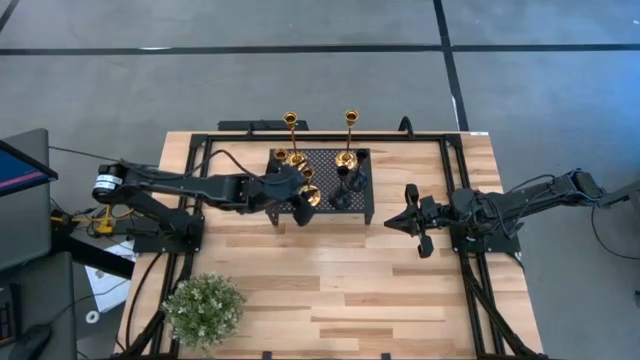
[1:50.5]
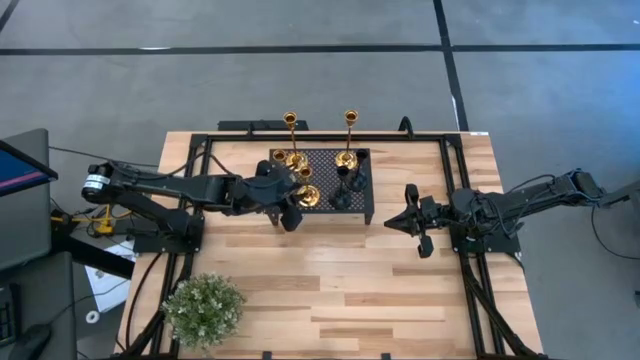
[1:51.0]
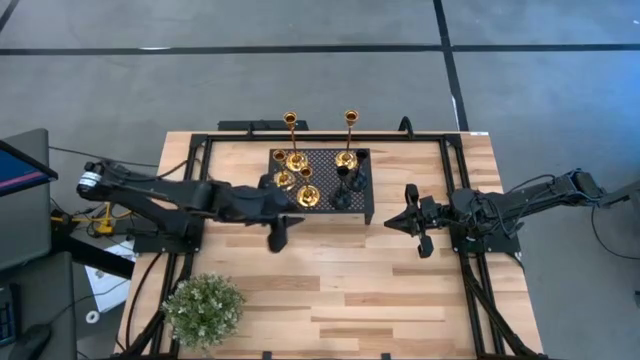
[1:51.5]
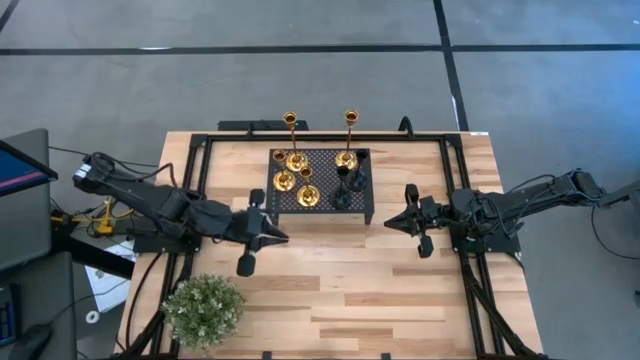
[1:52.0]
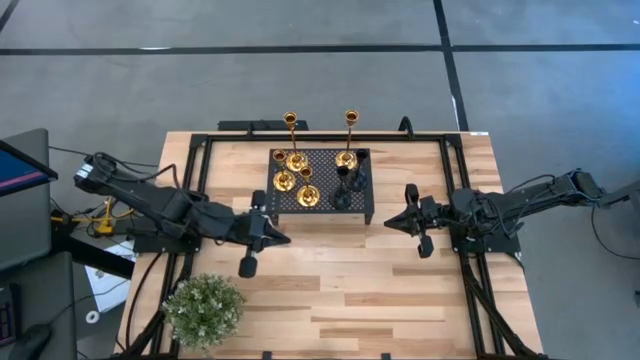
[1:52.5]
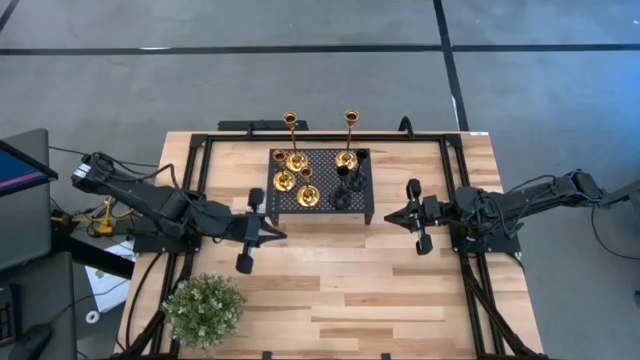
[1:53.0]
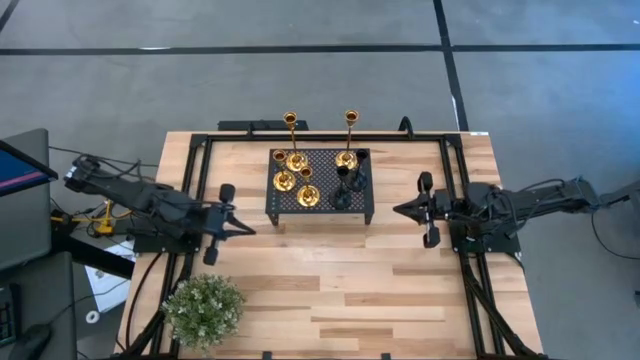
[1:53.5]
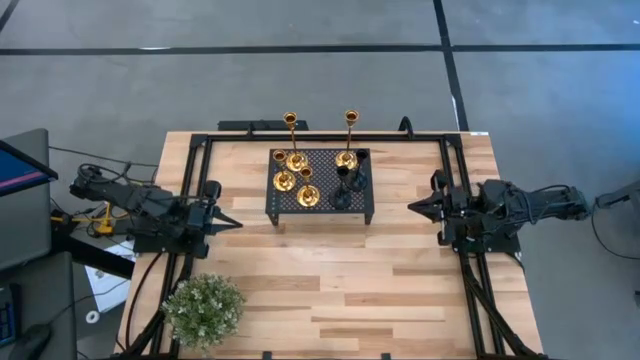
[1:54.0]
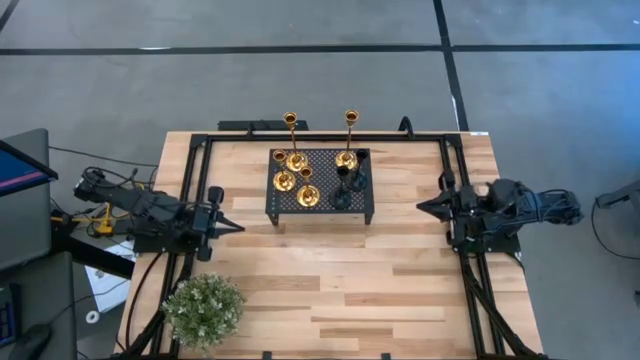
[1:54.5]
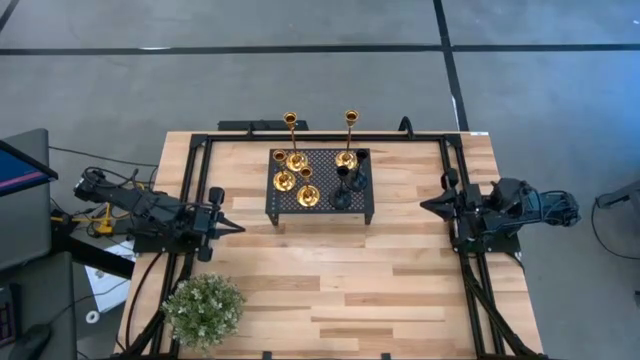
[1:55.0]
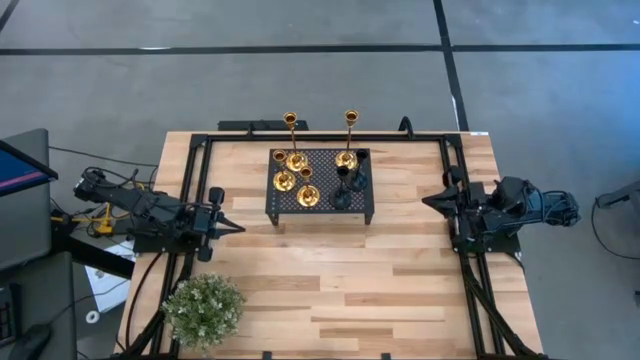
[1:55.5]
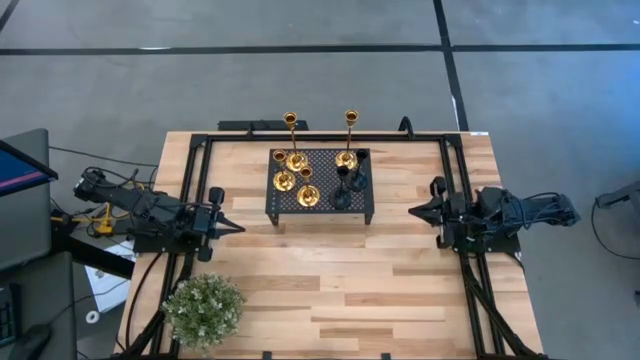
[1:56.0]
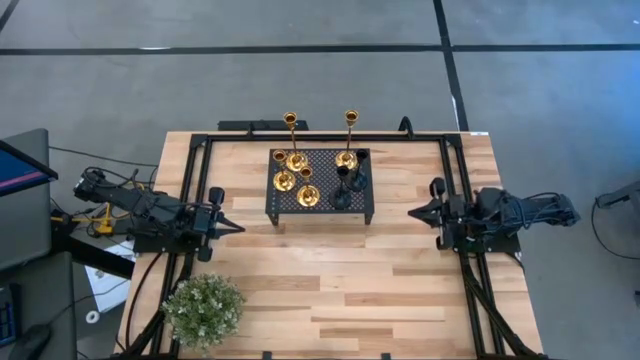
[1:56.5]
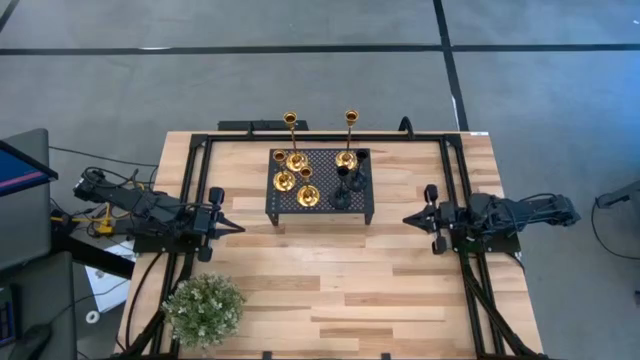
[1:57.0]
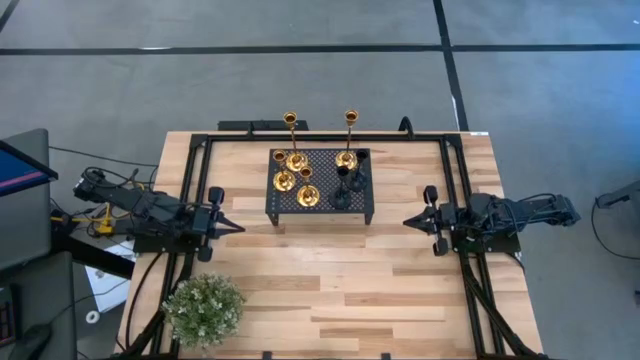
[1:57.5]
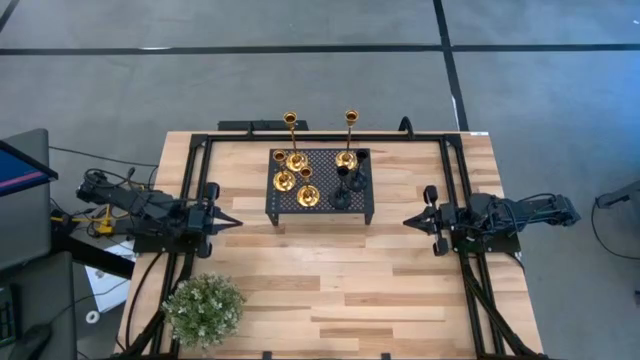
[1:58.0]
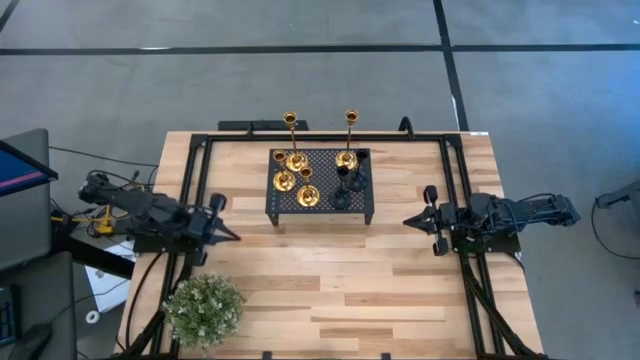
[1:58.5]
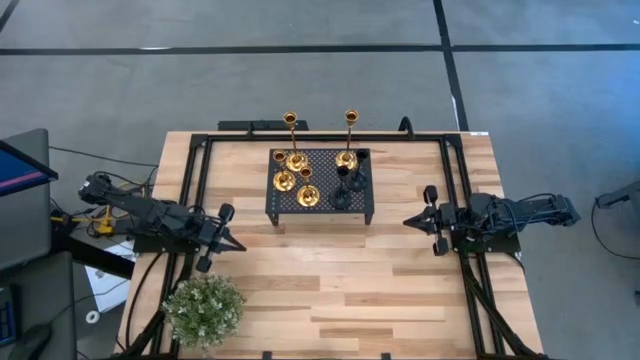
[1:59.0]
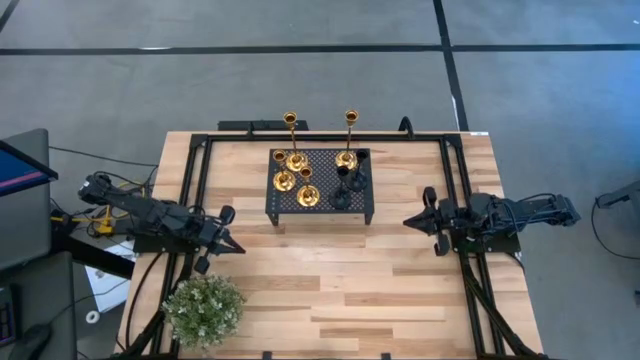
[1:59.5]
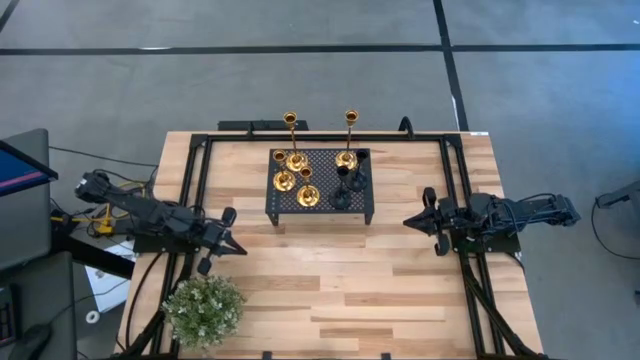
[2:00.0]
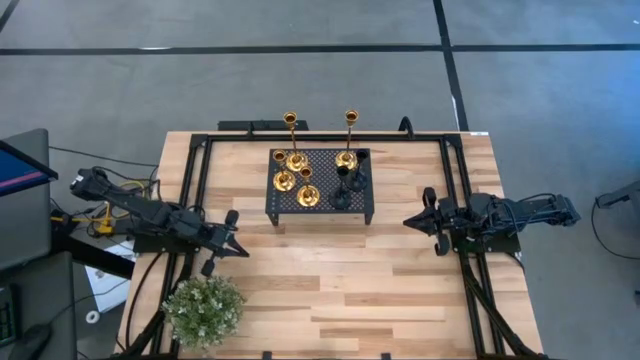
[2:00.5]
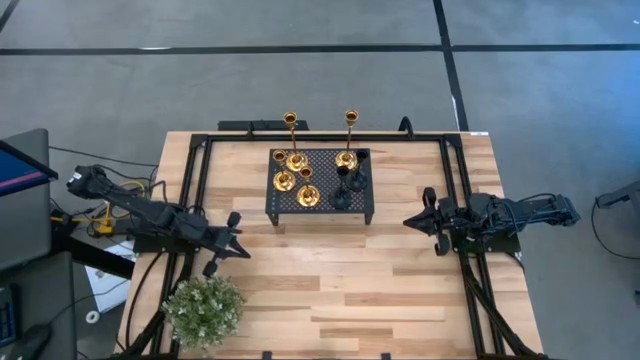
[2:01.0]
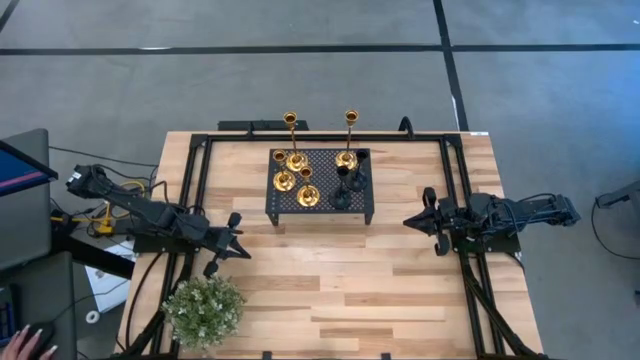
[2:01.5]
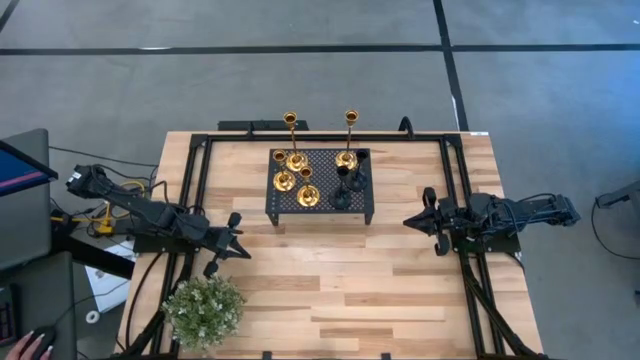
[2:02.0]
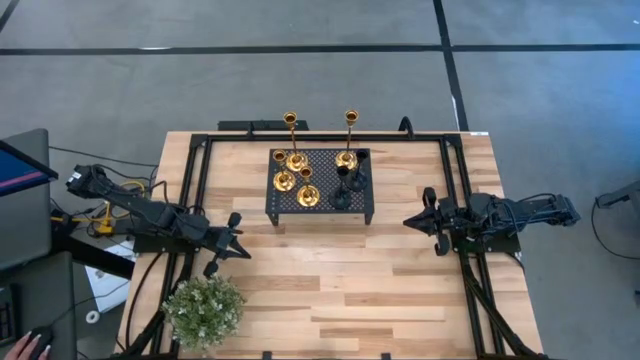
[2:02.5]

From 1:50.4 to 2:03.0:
Task: Pick & Place candle stick holders
Return to Home Position

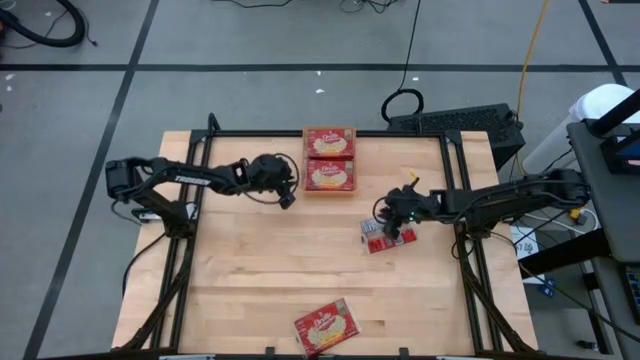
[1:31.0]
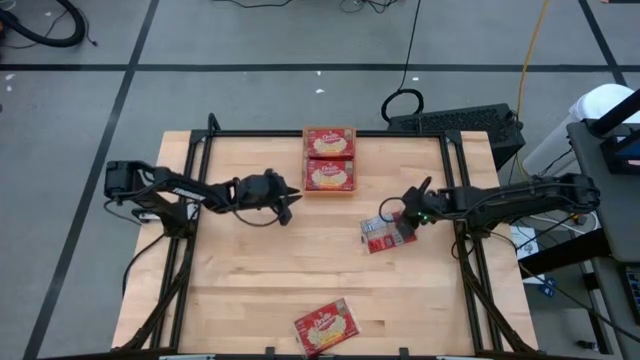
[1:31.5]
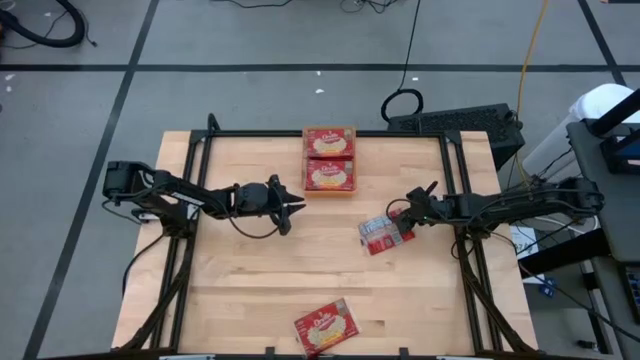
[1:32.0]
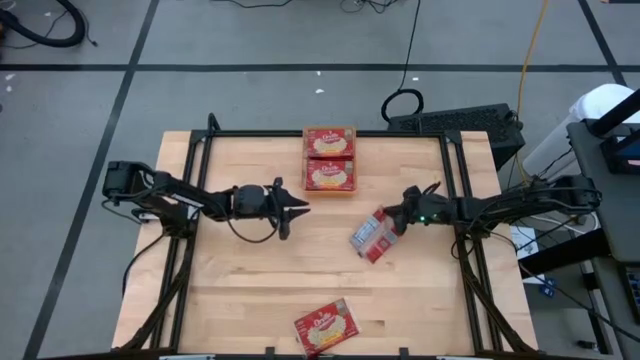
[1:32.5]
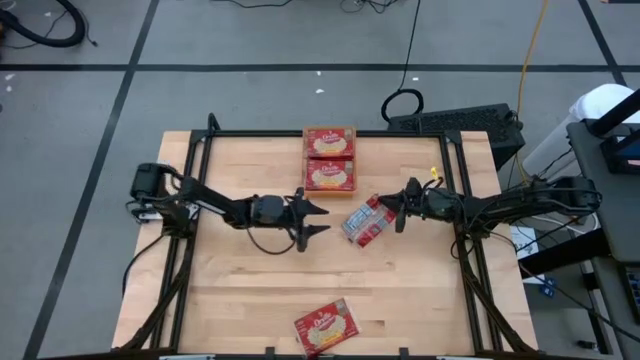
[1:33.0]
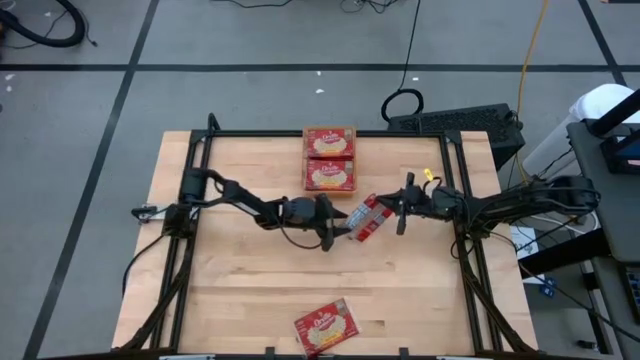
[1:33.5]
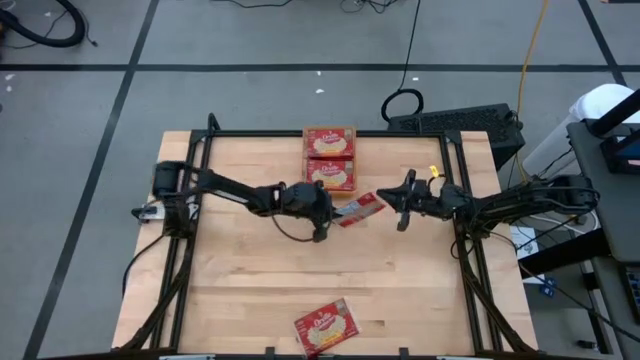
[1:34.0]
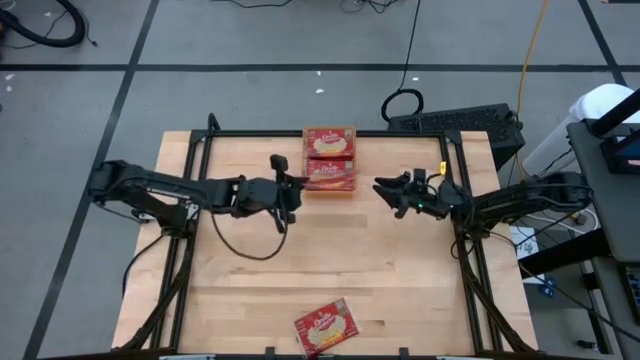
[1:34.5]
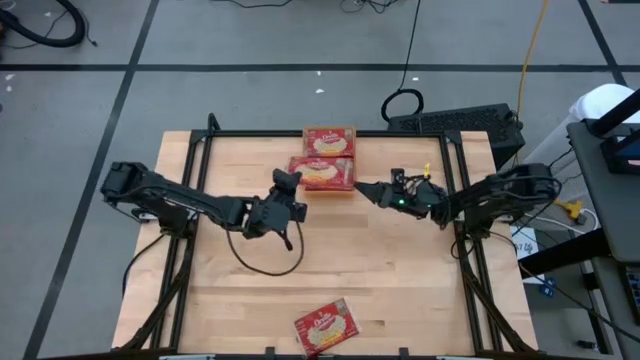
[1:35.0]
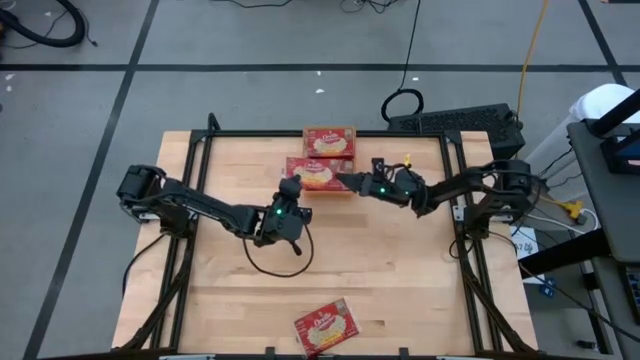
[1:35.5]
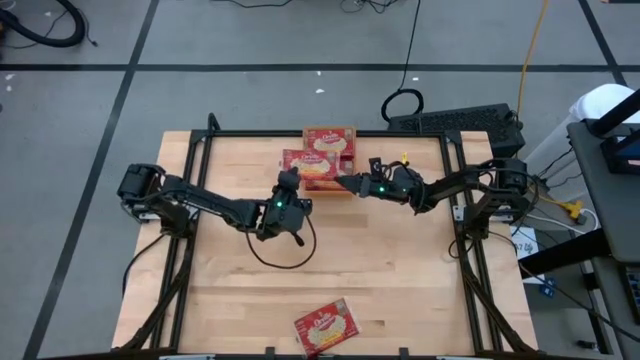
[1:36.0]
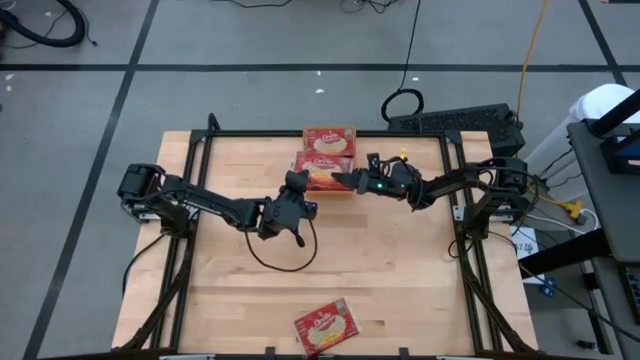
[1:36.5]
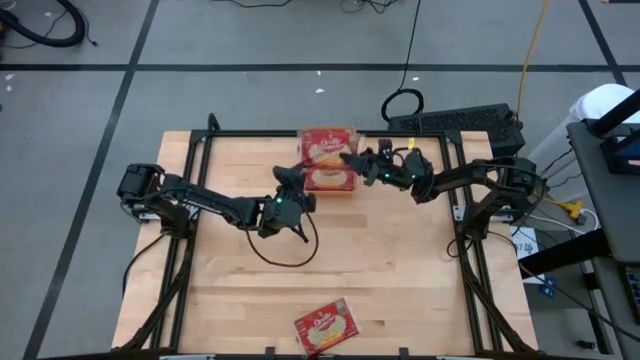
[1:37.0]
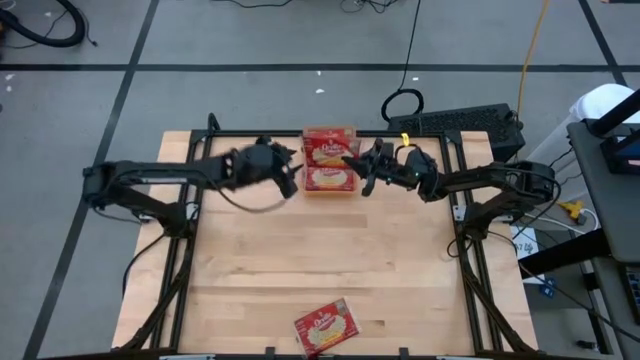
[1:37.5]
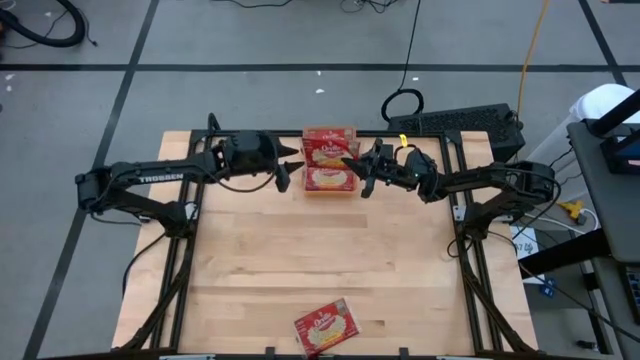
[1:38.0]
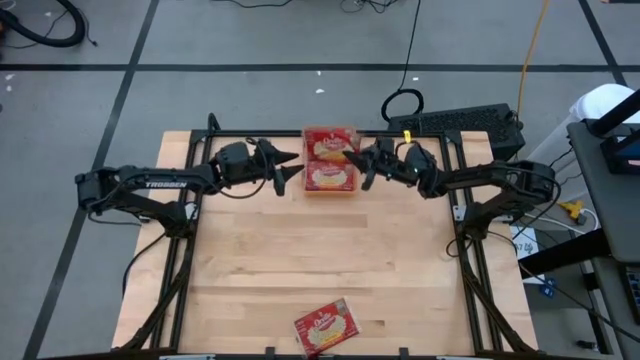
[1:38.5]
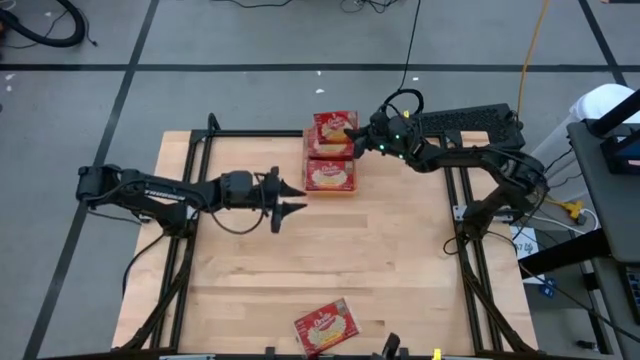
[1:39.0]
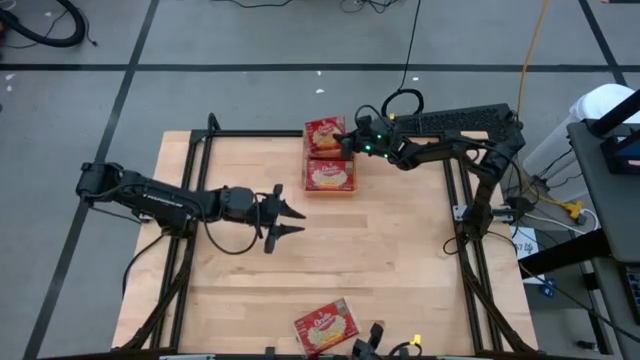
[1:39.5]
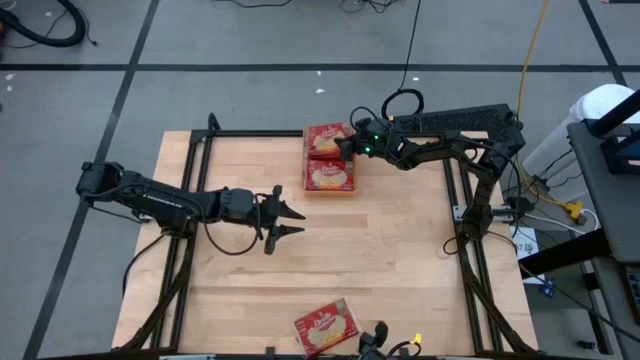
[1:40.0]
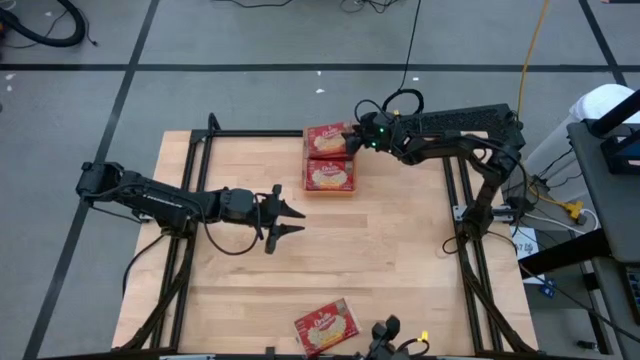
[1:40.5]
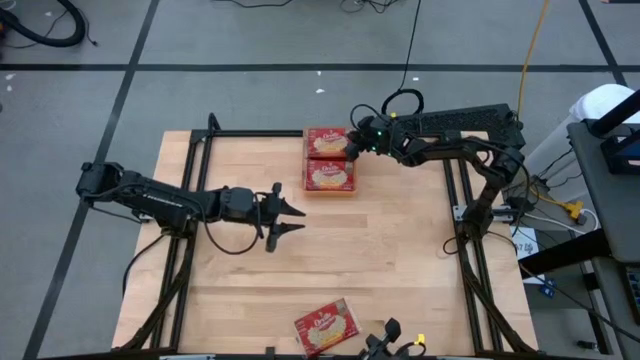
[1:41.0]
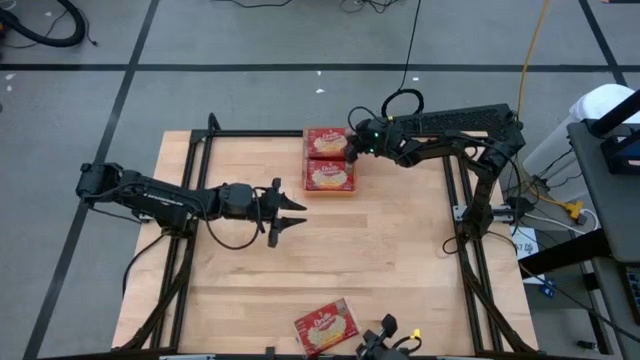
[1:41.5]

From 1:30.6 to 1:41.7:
Task: Sort popcorn bags into baskets
Put the red popcorn bag into the orange bin
